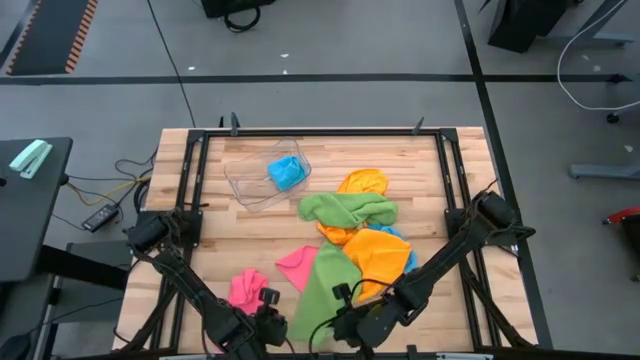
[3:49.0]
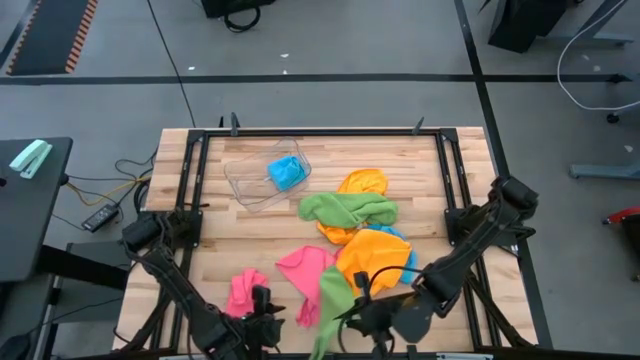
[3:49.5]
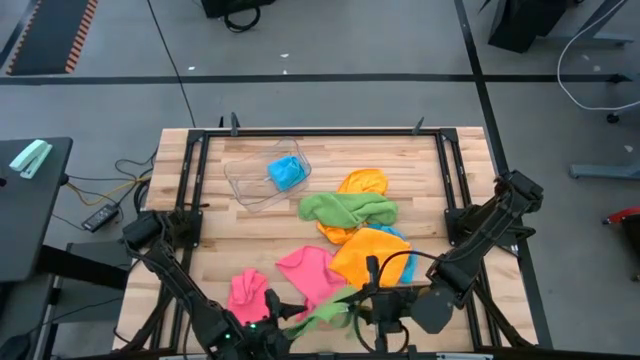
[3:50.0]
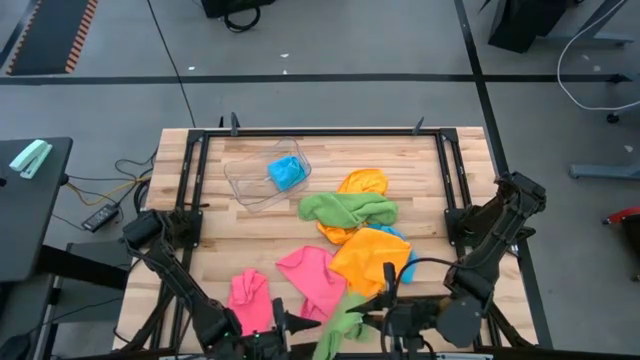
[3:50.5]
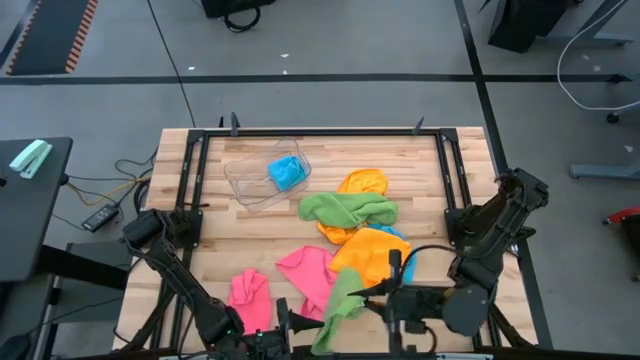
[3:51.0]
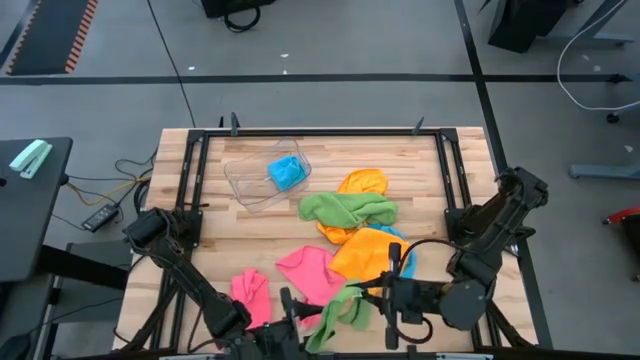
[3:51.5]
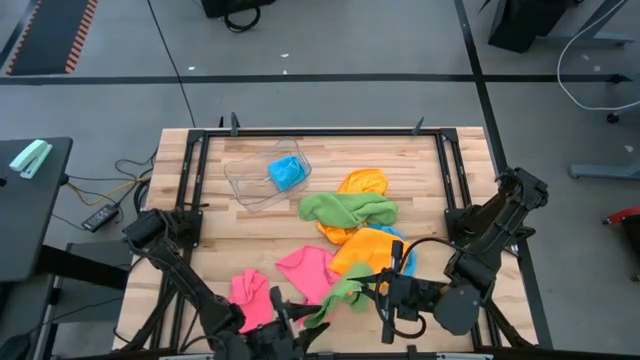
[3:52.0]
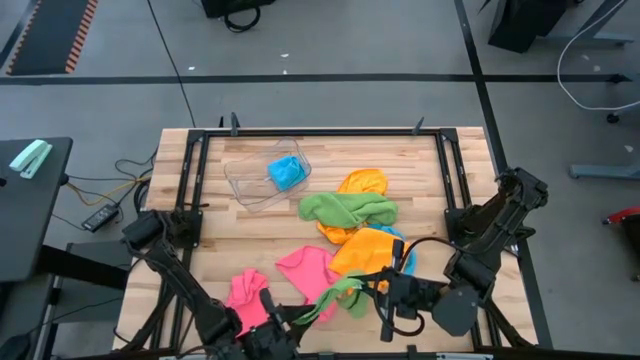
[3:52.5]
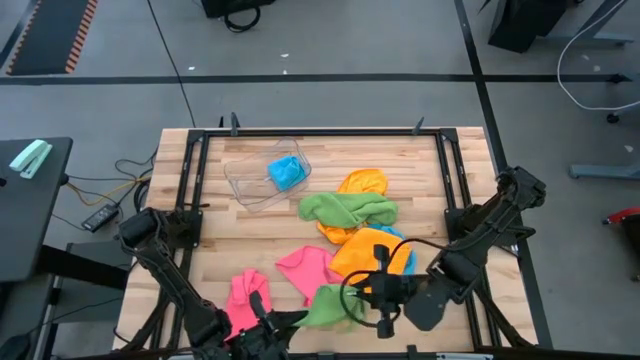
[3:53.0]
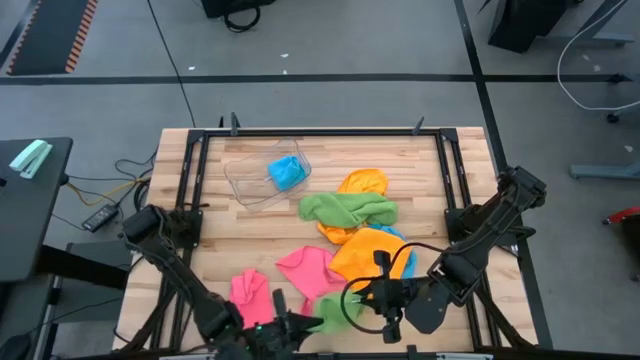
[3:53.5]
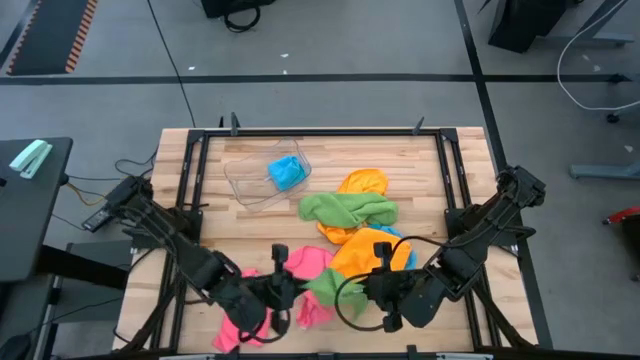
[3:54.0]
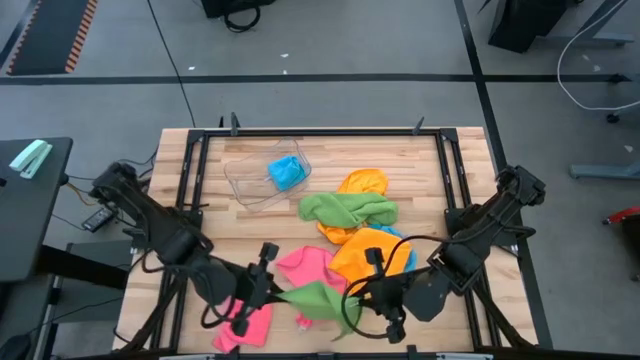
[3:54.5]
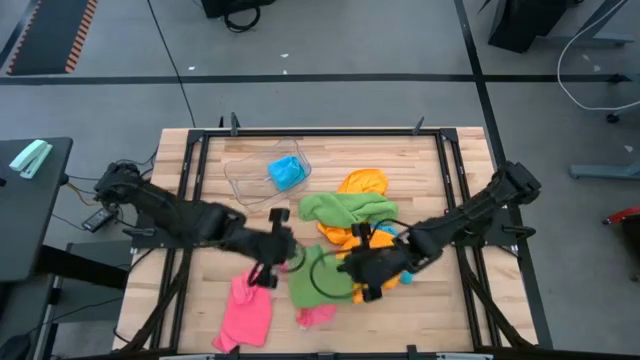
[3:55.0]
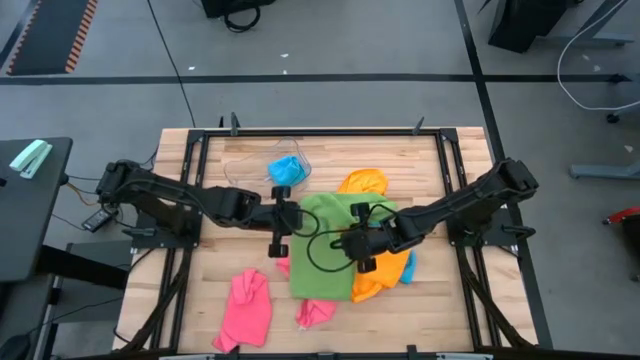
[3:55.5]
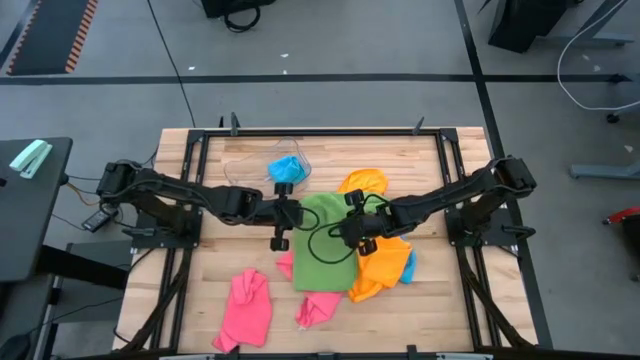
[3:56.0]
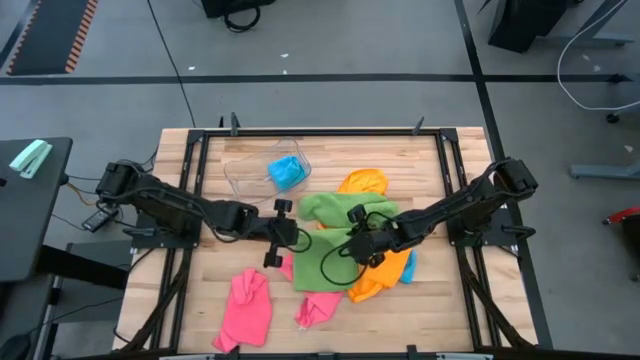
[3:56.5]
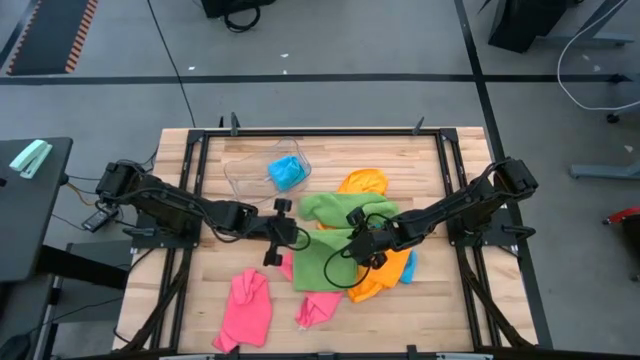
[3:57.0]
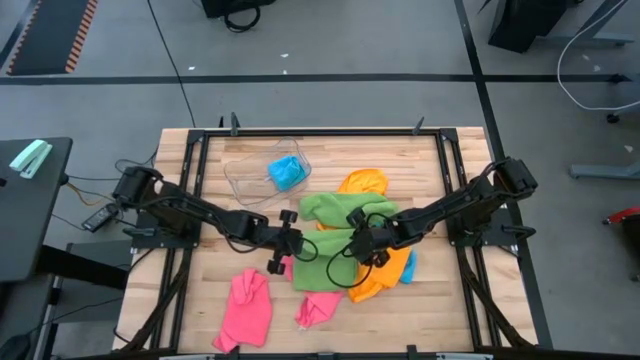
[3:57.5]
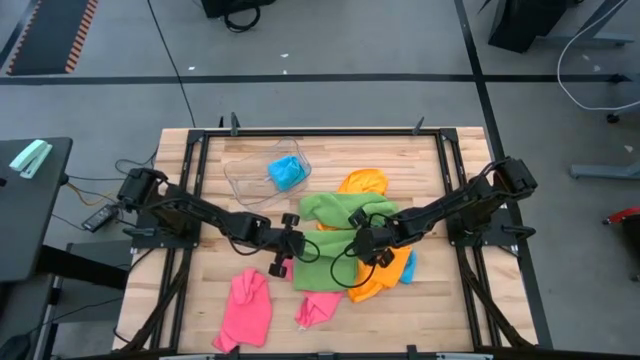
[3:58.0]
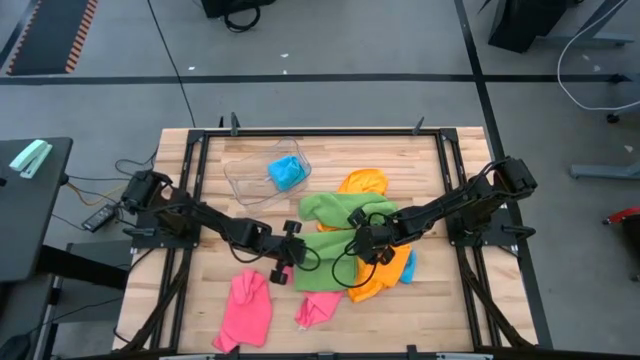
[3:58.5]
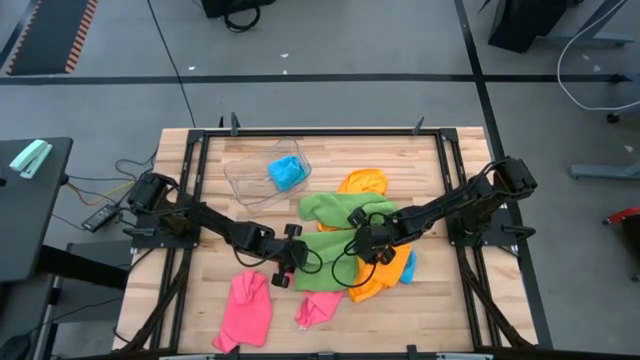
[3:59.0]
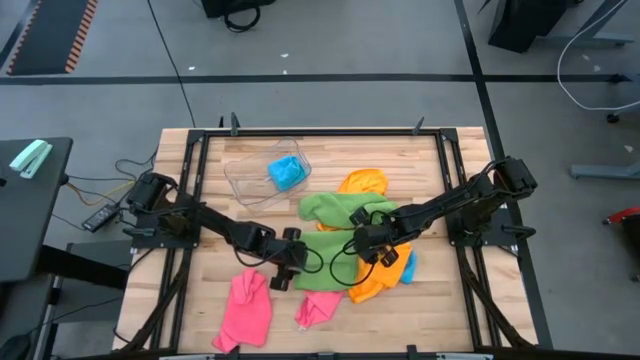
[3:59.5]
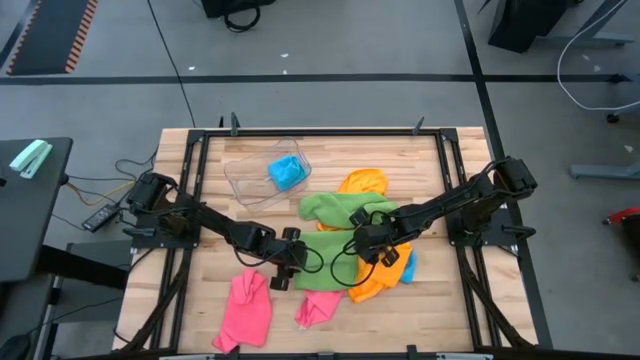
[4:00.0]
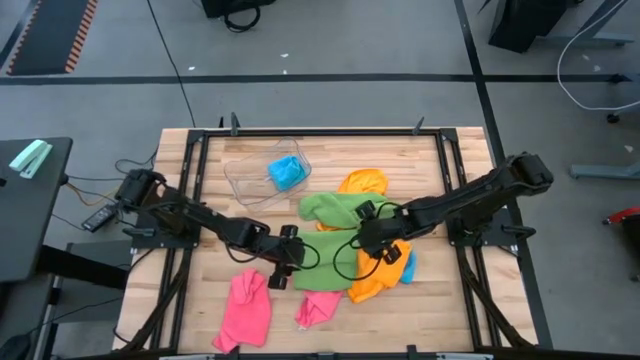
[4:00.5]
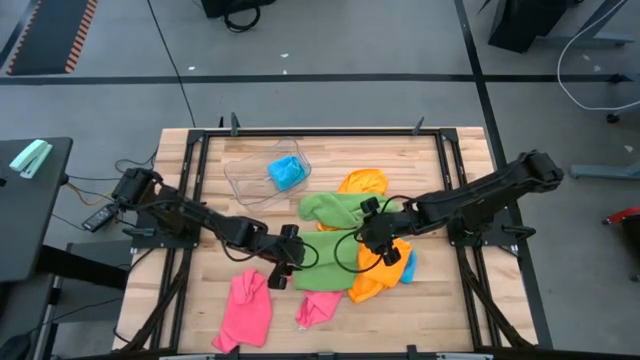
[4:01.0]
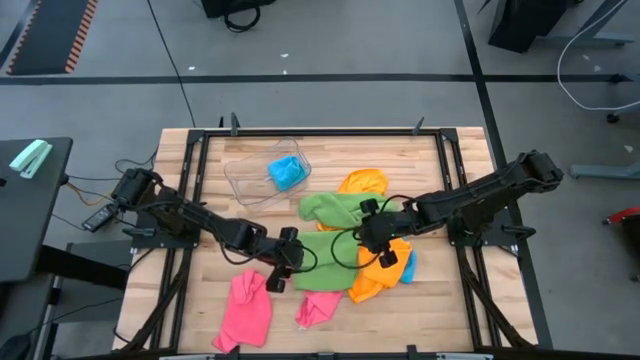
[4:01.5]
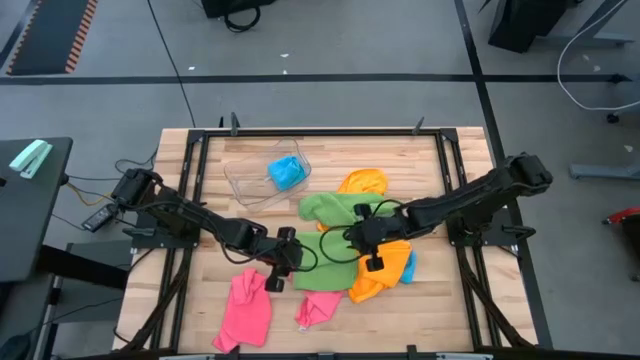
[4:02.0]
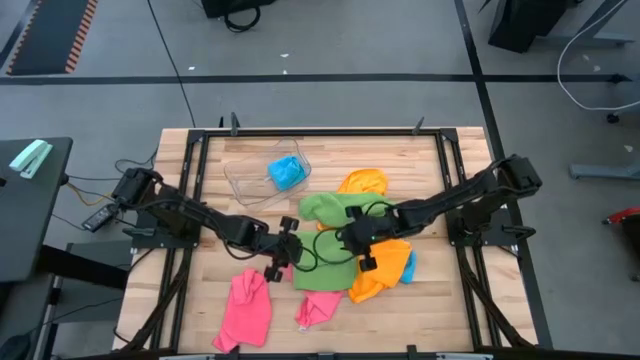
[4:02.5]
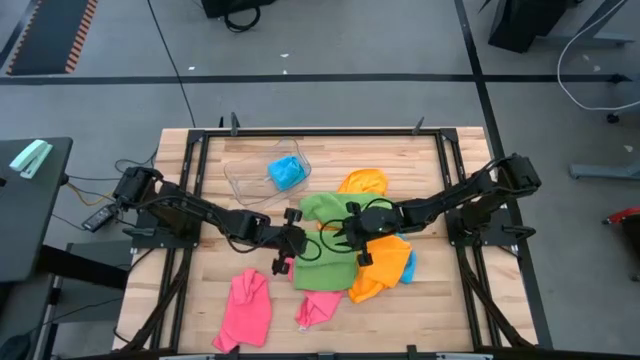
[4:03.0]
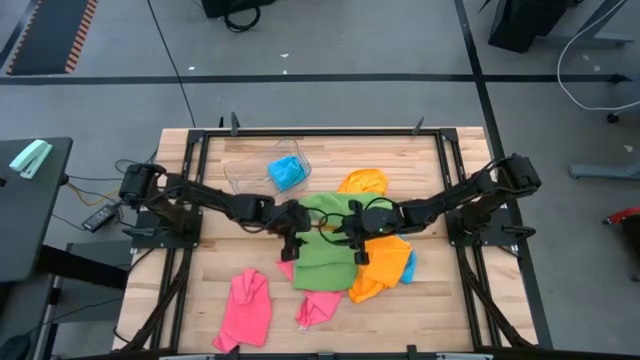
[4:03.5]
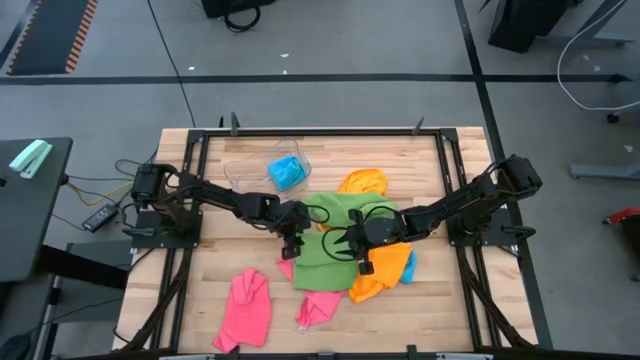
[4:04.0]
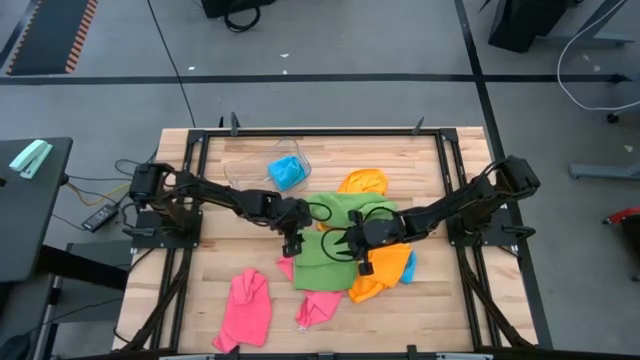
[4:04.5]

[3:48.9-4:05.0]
Task: Fold microfiber towels
Fold the left green microfiber towel

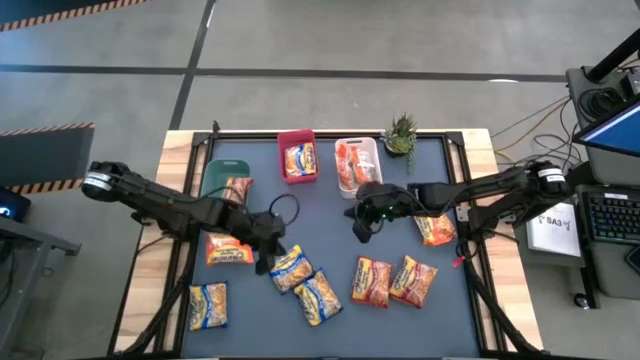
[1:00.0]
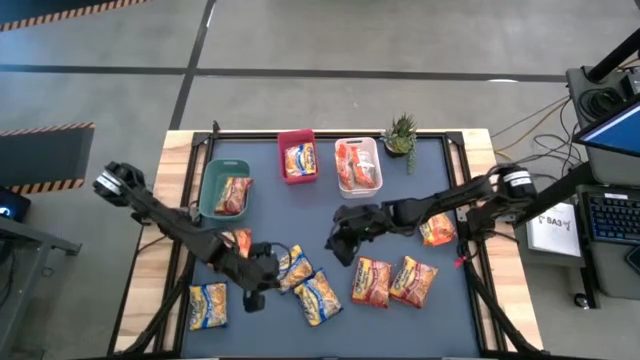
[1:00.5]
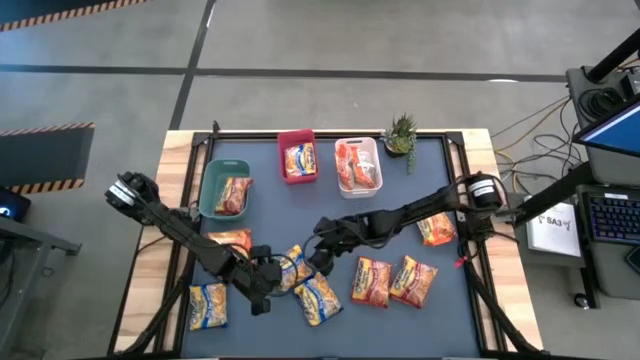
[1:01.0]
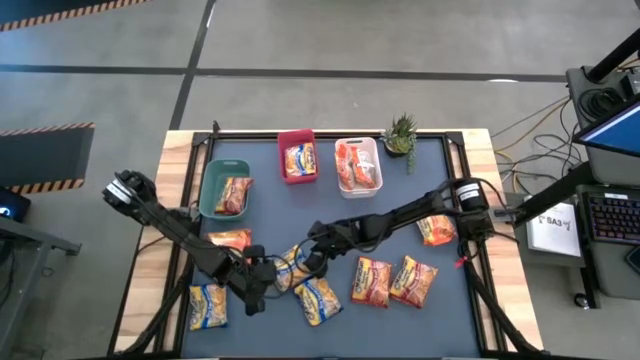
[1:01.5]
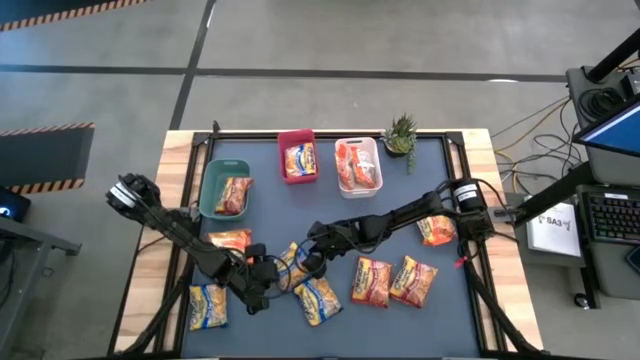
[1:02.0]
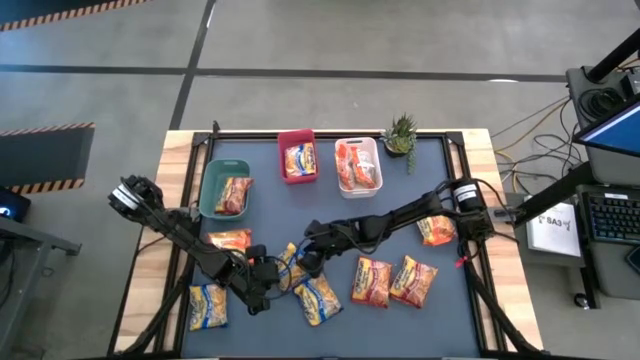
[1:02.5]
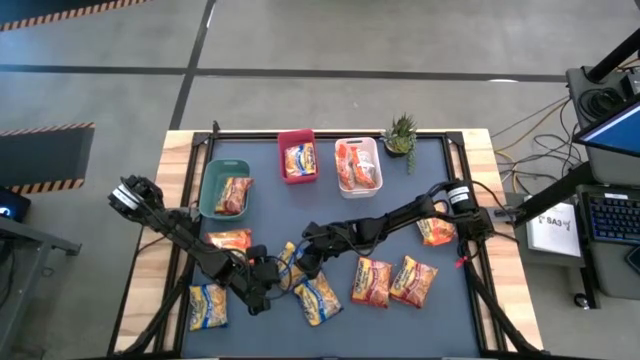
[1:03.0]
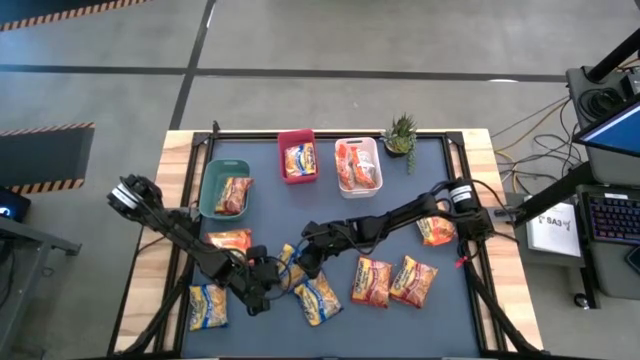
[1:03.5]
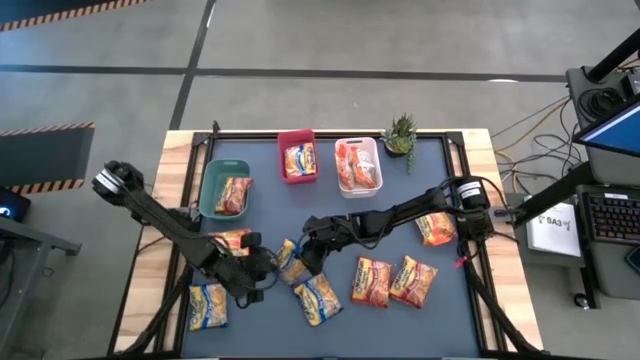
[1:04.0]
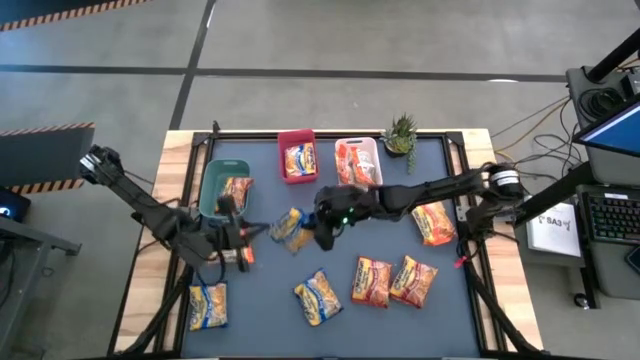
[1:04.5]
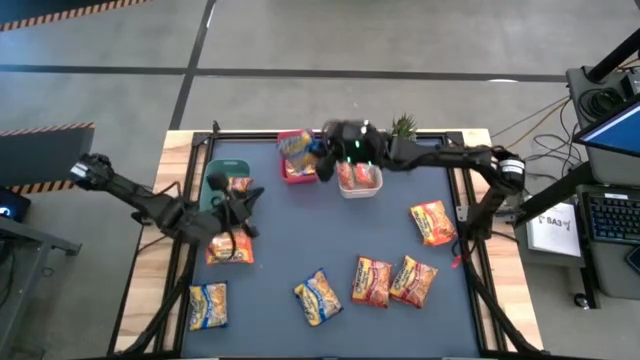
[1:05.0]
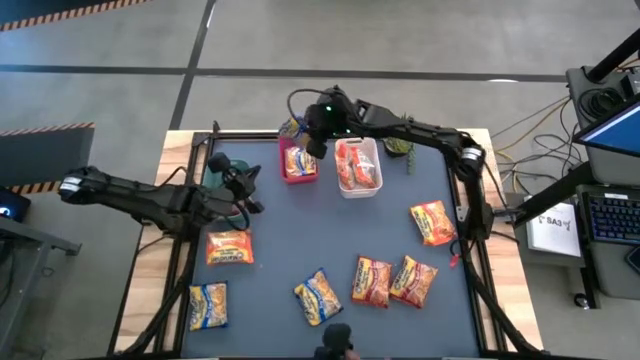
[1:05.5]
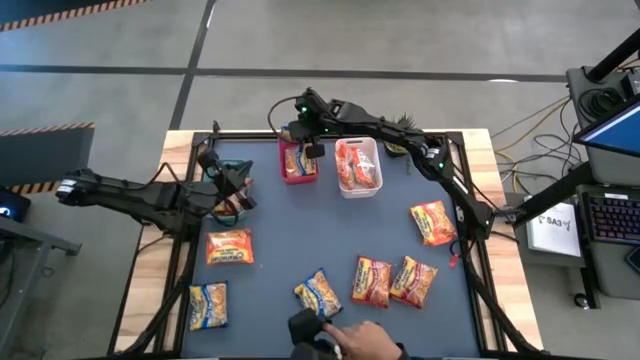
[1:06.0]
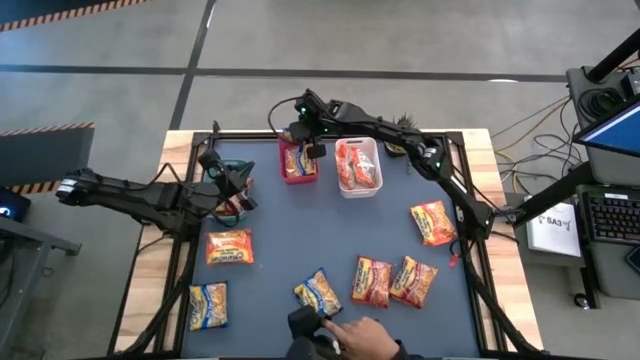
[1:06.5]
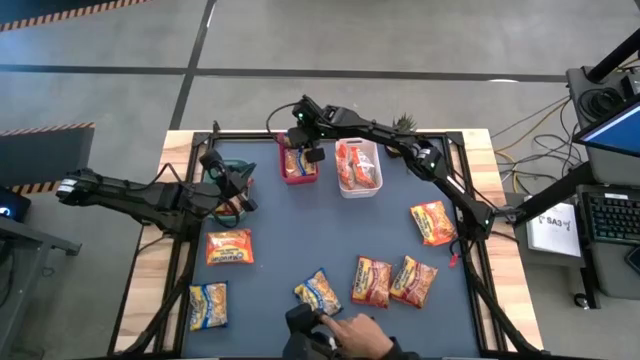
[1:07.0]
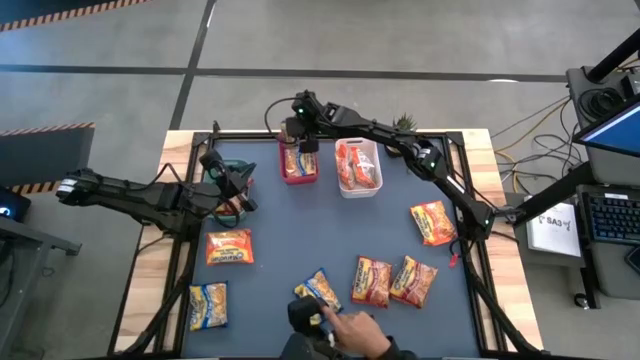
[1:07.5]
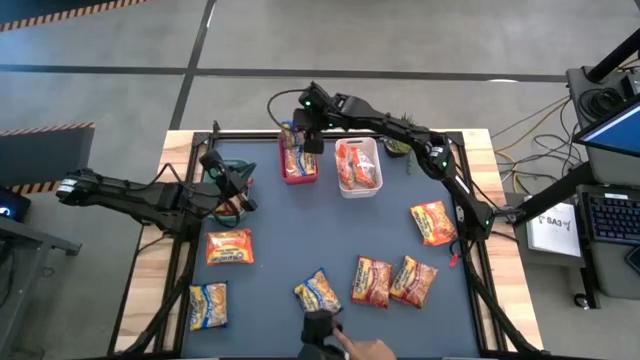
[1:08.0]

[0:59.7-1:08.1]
Task: Sort Maruchan noodles
Put the blue noodle pack into the red bin
